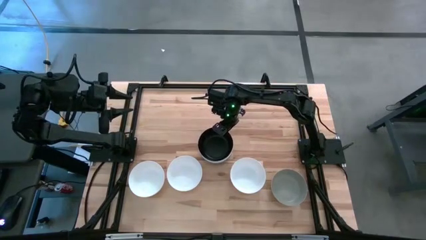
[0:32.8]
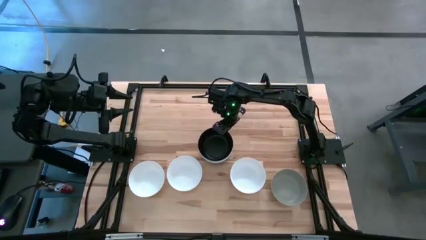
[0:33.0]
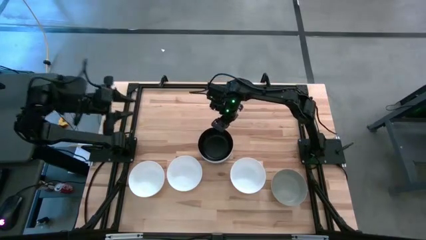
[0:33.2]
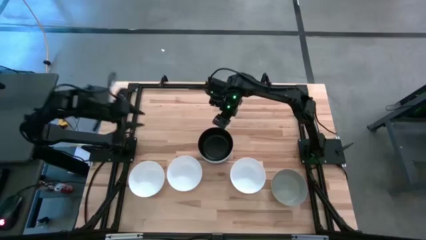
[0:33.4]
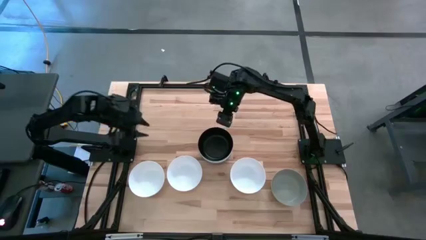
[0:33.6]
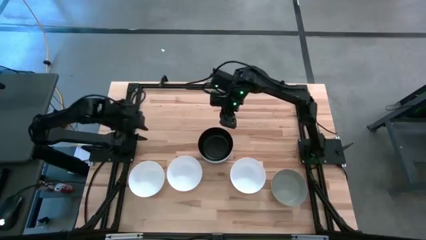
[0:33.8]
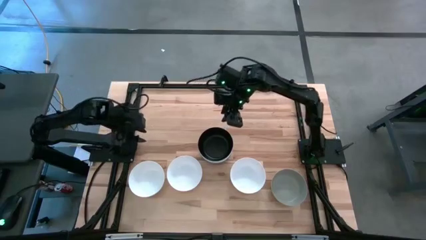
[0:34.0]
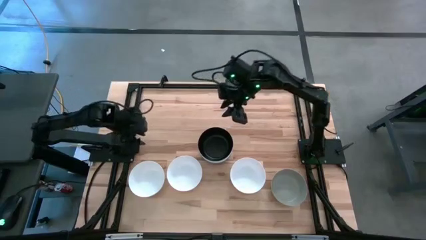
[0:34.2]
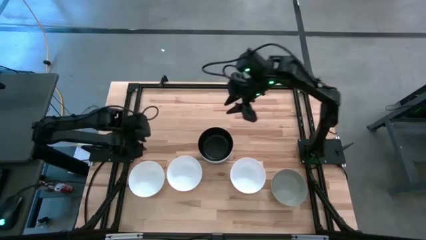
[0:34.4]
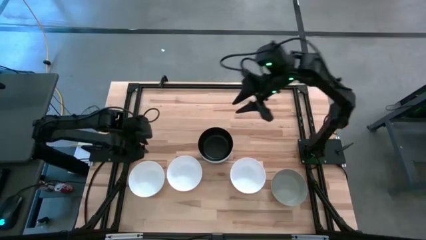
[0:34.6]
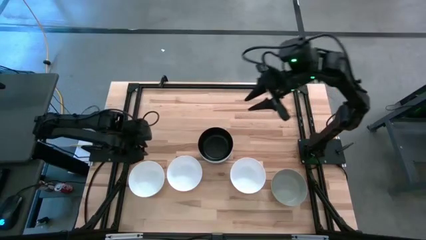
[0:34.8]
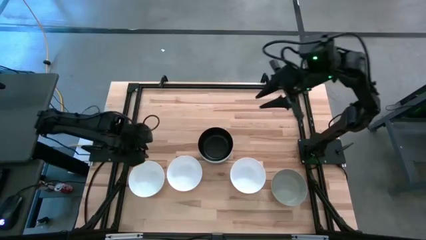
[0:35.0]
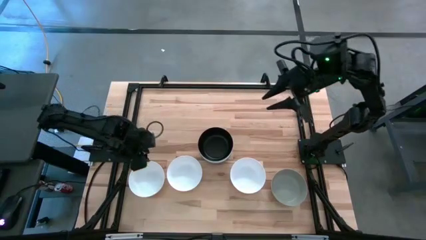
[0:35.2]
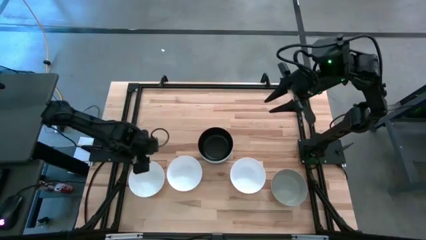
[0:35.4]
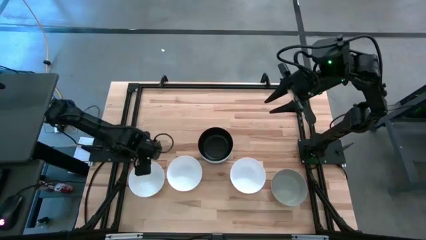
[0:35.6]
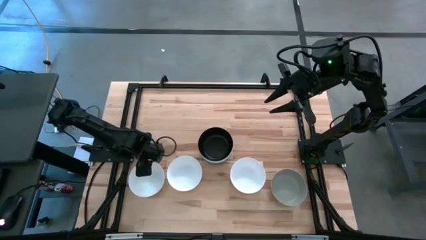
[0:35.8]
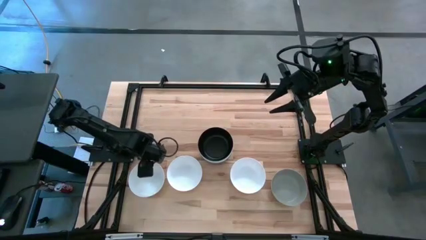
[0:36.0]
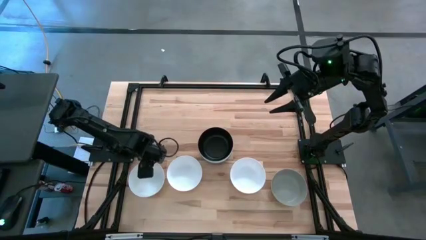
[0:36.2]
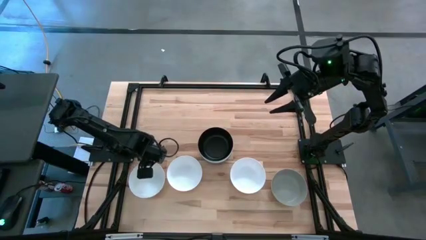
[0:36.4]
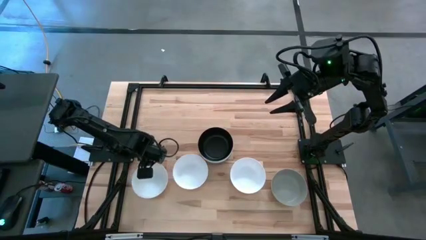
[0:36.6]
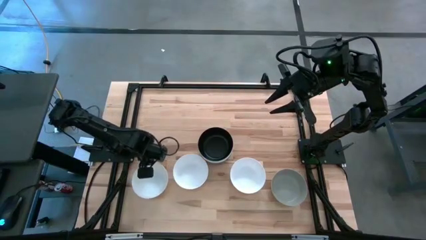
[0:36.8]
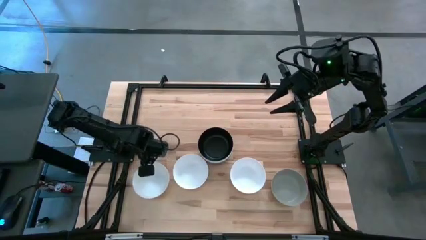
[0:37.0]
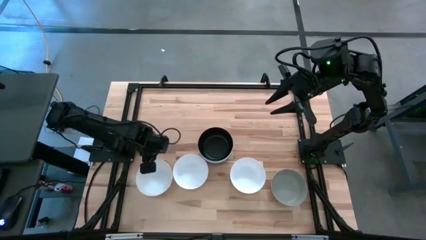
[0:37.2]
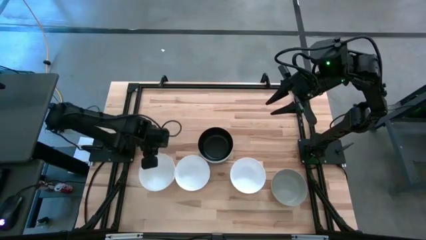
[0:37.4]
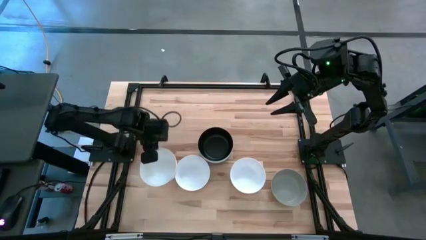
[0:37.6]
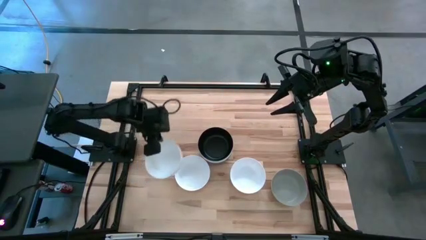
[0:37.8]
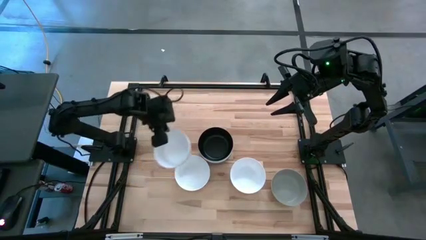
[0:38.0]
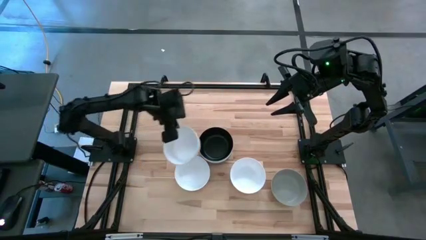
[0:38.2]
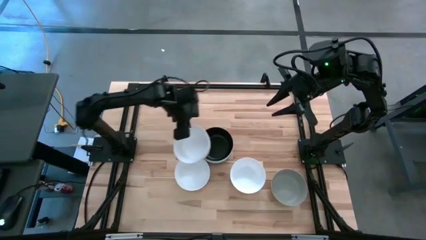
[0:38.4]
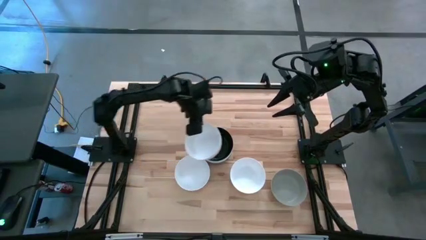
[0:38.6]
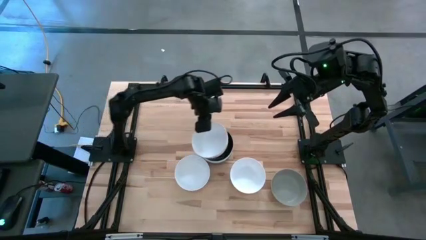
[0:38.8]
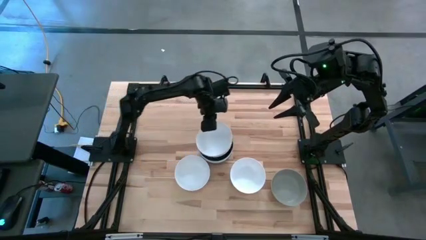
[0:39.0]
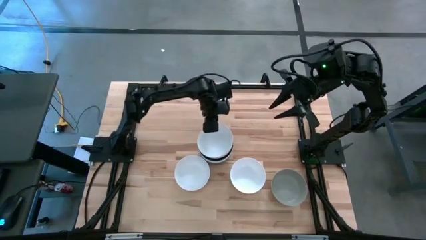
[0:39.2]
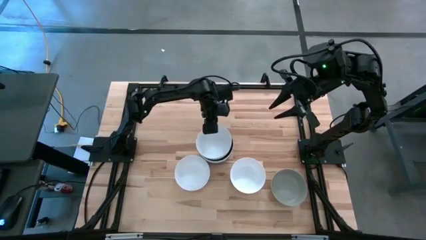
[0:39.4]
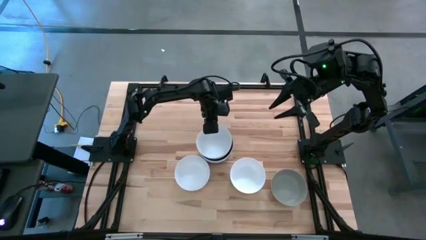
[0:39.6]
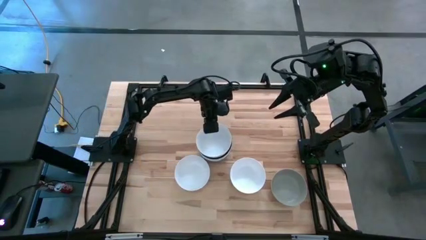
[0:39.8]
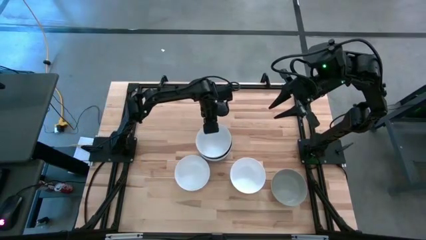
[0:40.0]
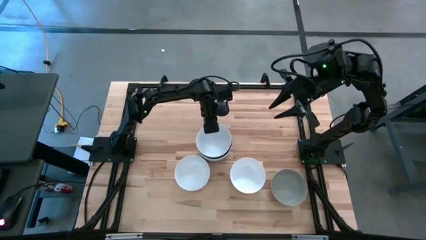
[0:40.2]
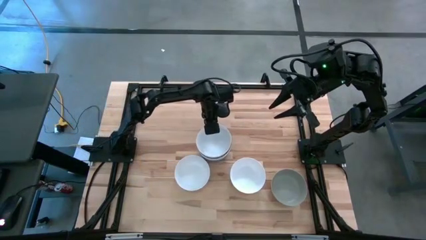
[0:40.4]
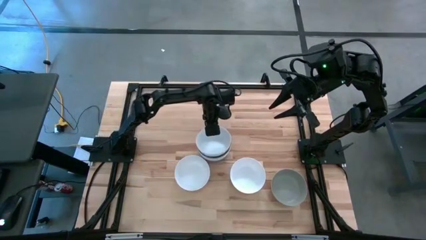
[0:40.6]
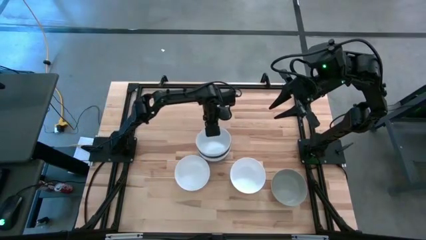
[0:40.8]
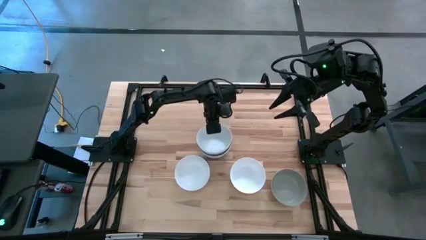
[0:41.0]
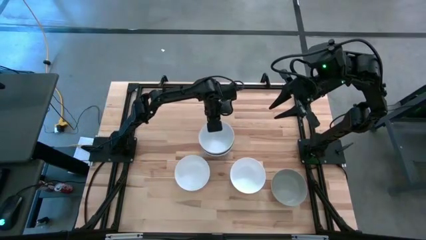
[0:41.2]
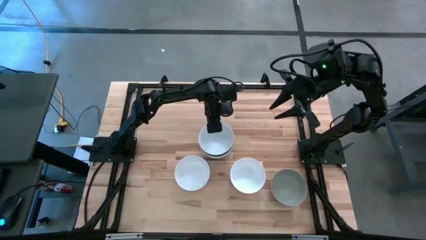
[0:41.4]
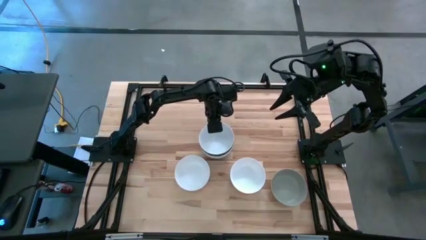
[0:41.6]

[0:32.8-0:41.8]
Task: Nest bowls inside each other
Stack the white bowl on top of the black bowl

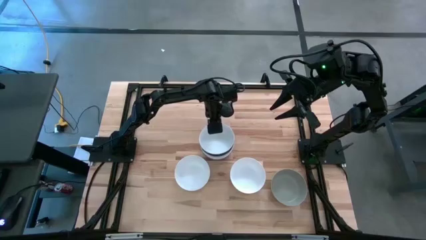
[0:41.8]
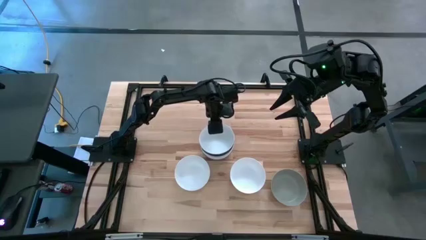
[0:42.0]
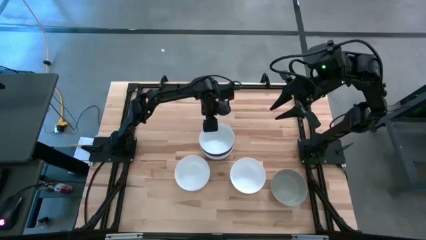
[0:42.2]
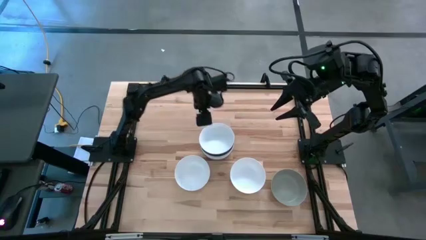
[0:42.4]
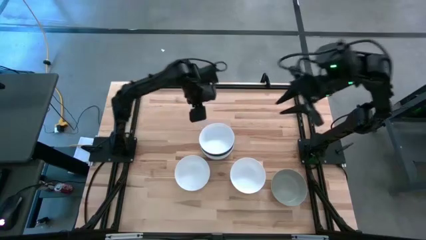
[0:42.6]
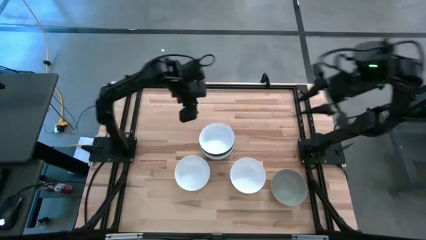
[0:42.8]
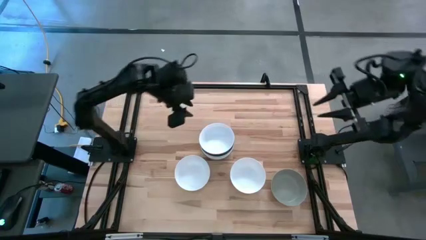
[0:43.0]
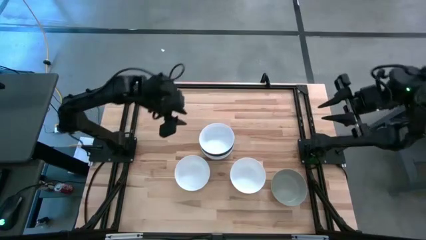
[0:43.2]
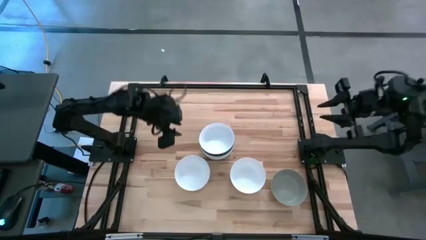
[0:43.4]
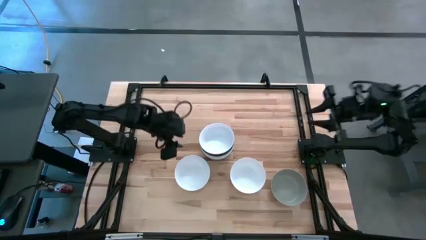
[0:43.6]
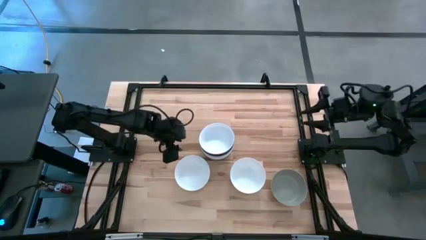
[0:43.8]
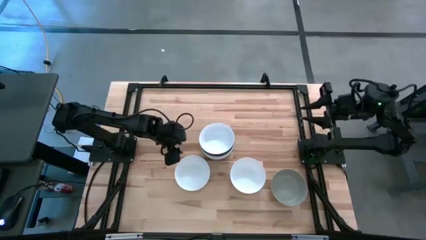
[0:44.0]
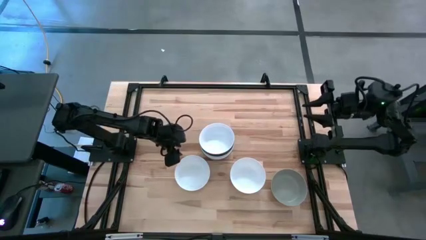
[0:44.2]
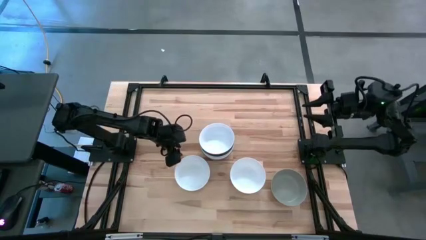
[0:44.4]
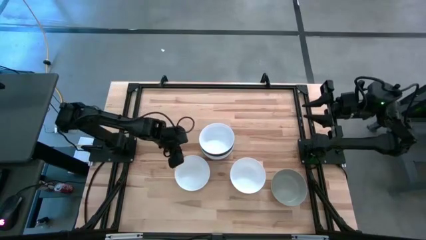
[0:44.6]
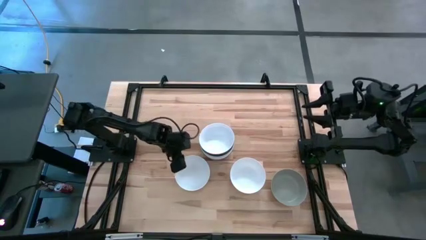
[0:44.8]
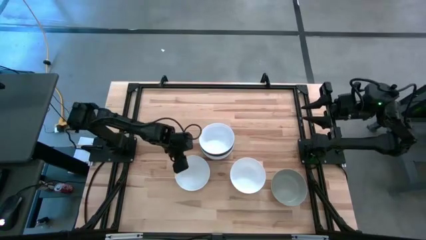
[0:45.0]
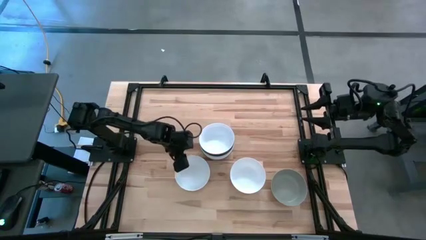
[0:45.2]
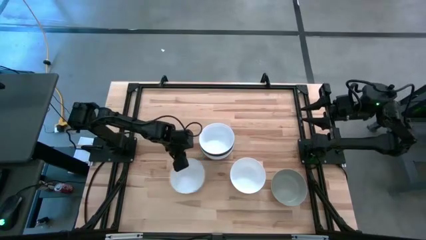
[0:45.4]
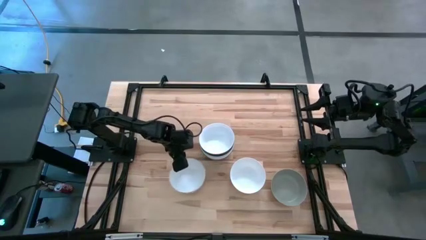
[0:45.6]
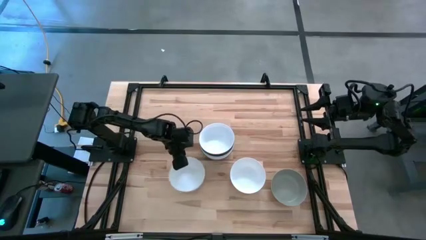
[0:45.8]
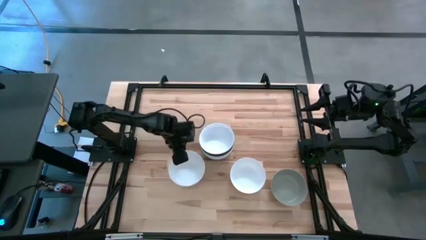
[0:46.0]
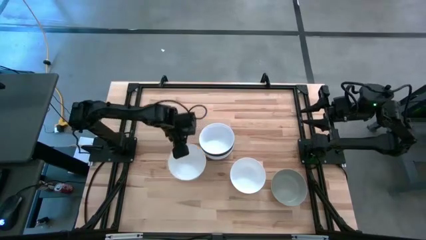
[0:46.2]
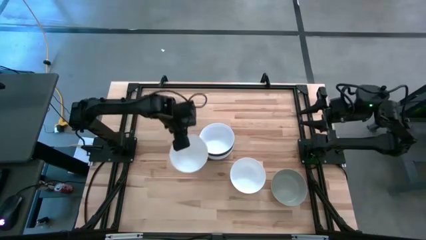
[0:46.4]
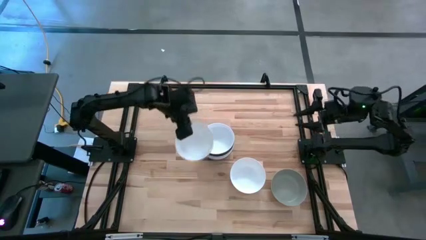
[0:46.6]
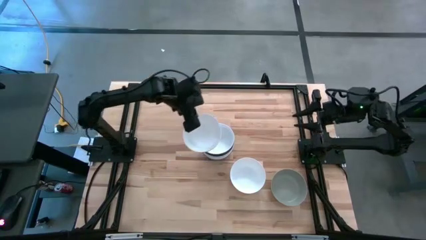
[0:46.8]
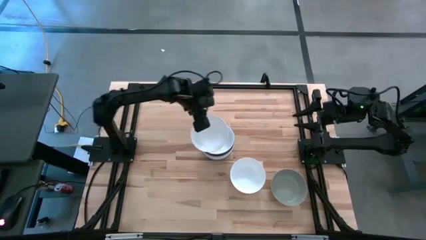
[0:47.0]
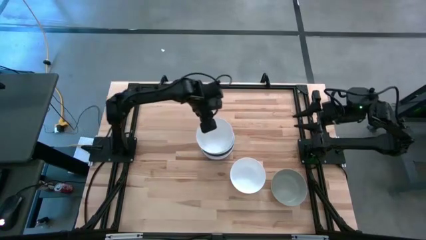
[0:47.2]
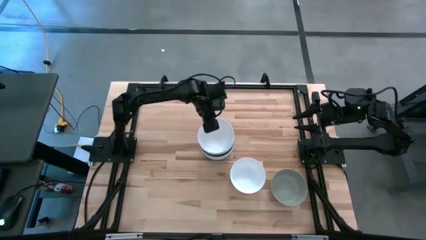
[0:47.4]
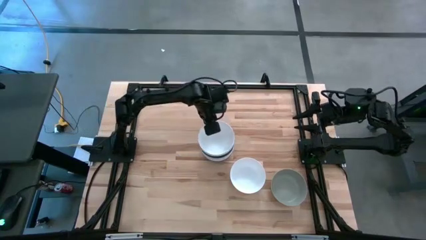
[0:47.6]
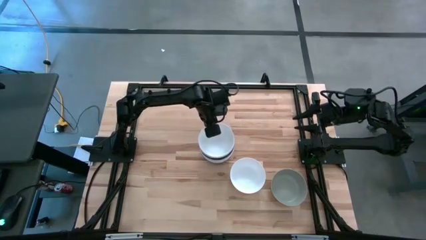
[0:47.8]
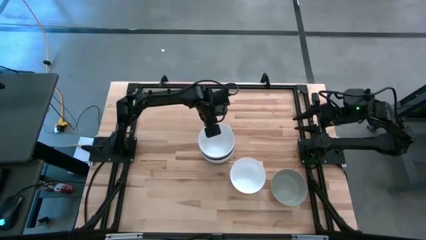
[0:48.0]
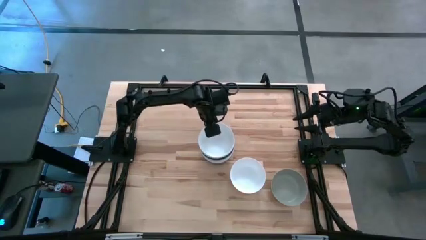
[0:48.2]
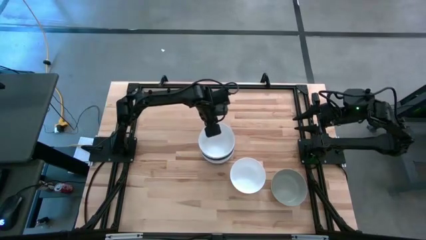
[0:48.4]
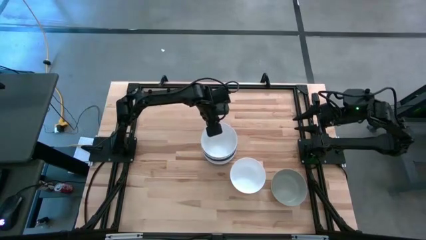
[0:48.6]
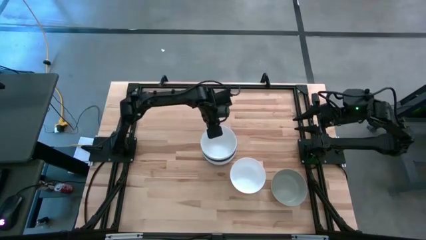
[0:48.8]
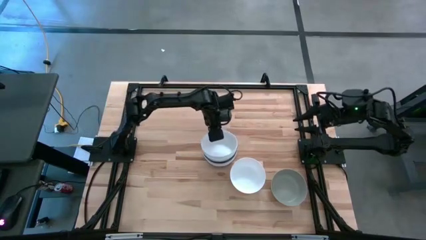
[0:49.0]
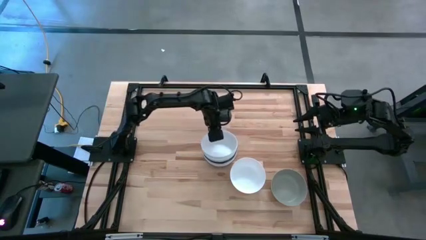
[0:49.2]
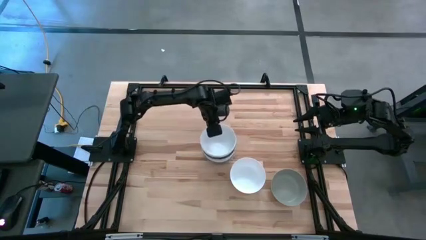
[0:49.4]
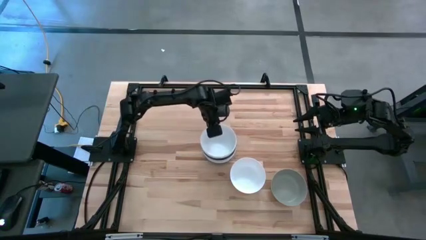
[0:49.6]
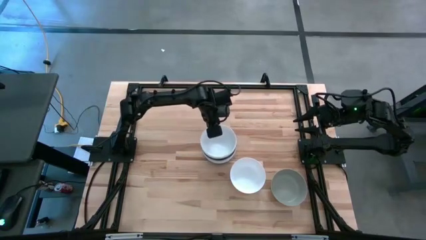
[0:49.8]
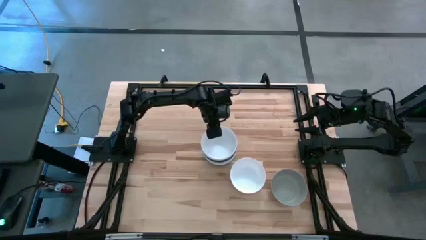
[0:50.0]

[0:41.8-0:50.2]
Stack the white bowl on top of the white bowl
